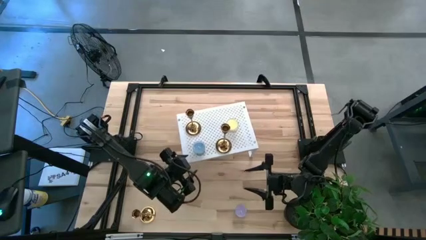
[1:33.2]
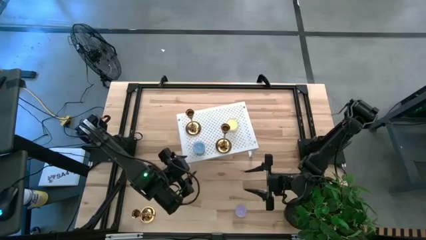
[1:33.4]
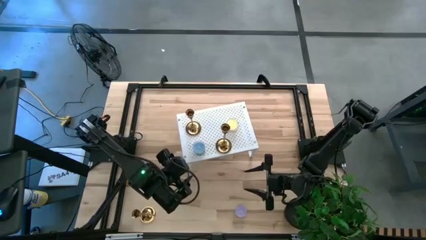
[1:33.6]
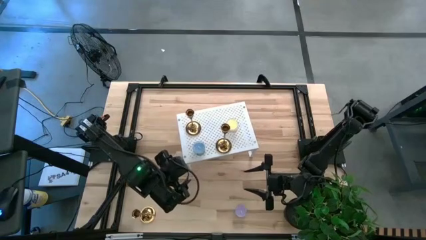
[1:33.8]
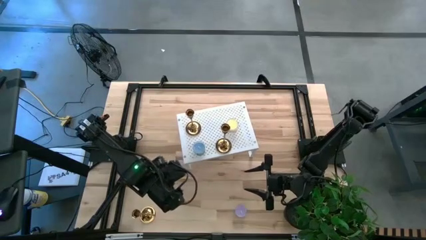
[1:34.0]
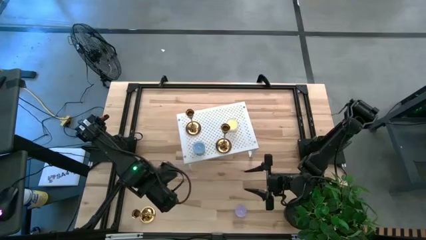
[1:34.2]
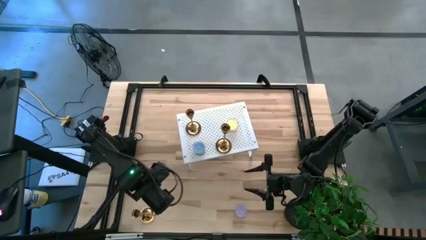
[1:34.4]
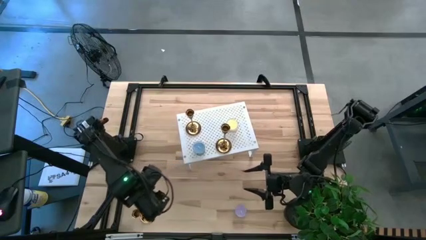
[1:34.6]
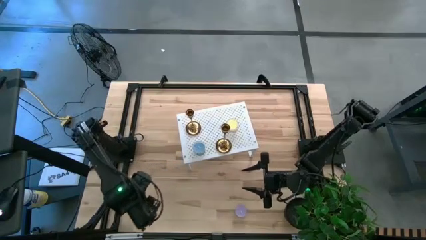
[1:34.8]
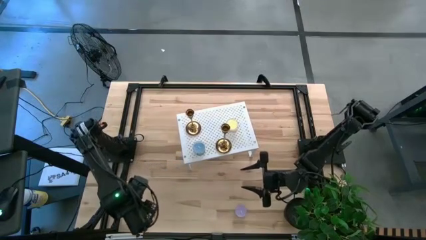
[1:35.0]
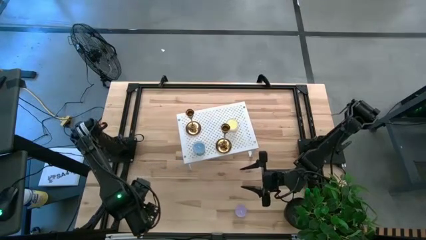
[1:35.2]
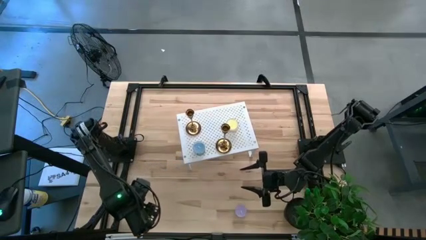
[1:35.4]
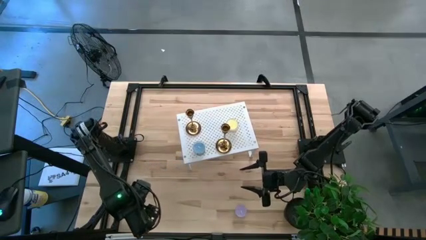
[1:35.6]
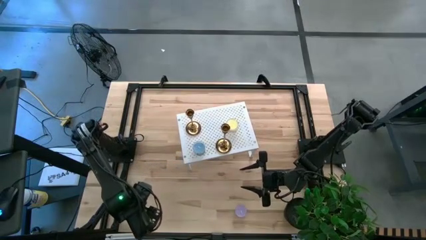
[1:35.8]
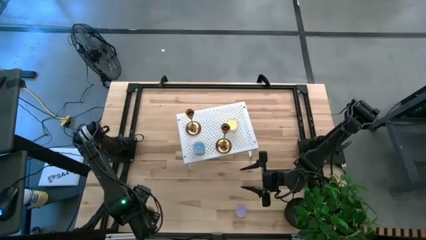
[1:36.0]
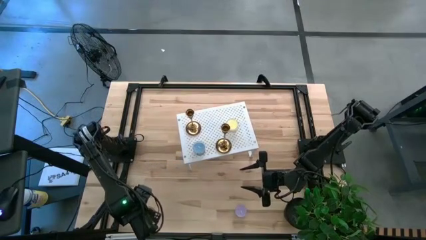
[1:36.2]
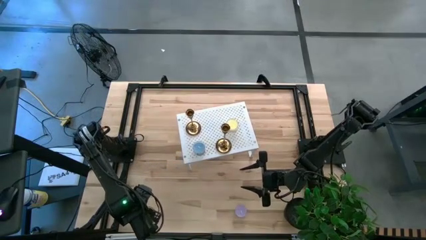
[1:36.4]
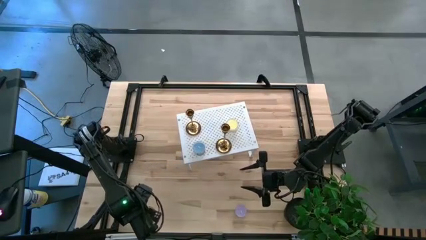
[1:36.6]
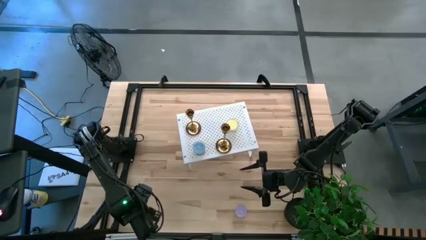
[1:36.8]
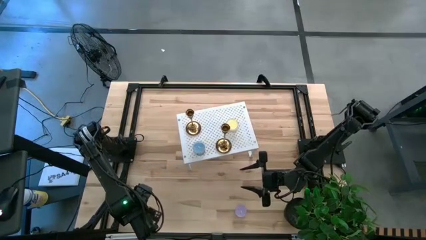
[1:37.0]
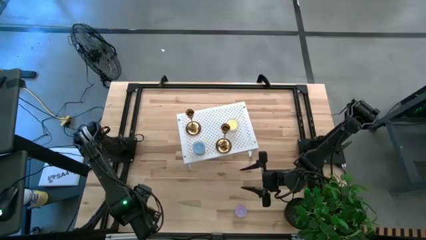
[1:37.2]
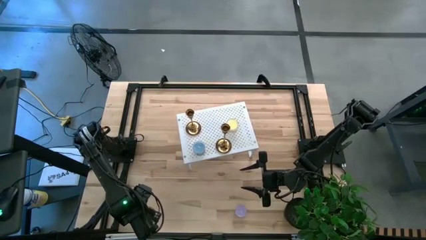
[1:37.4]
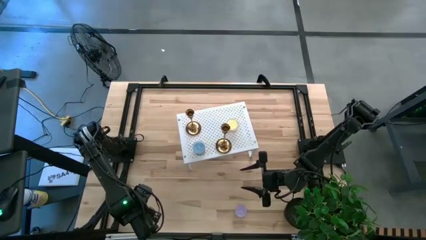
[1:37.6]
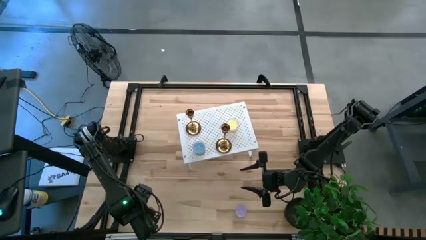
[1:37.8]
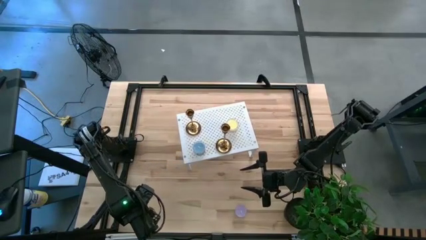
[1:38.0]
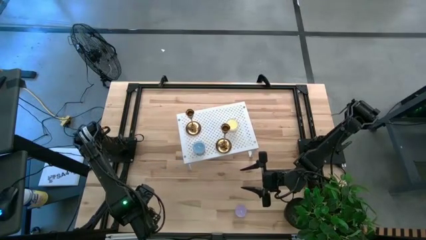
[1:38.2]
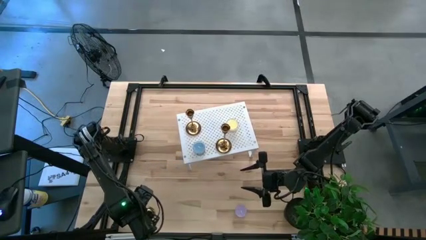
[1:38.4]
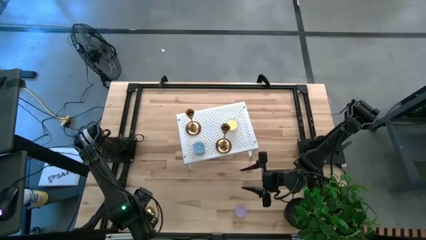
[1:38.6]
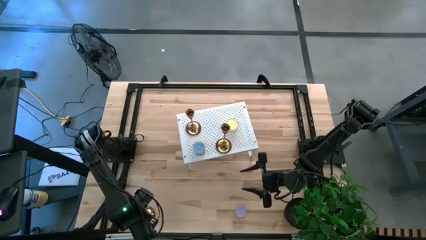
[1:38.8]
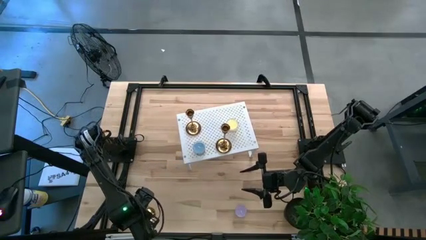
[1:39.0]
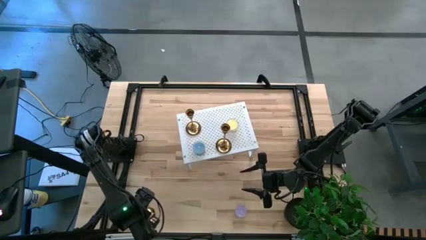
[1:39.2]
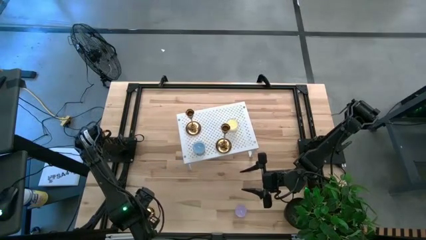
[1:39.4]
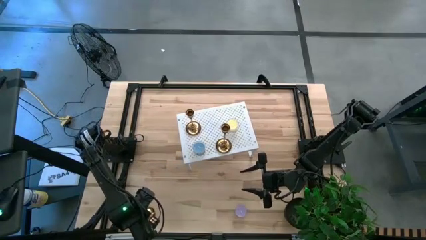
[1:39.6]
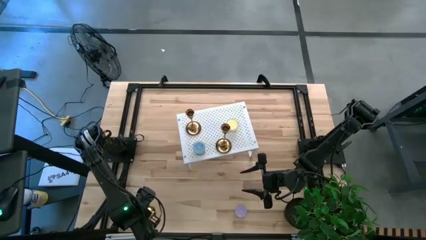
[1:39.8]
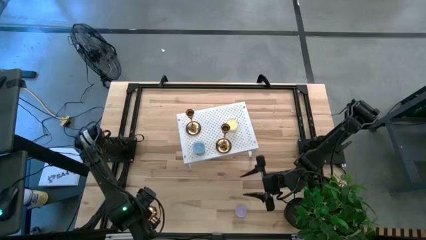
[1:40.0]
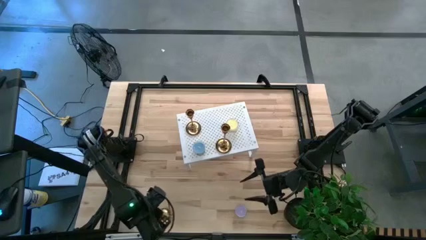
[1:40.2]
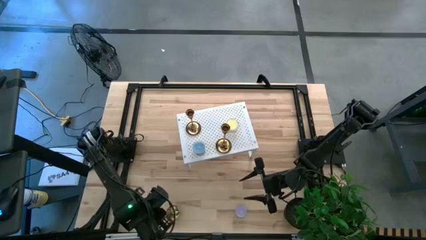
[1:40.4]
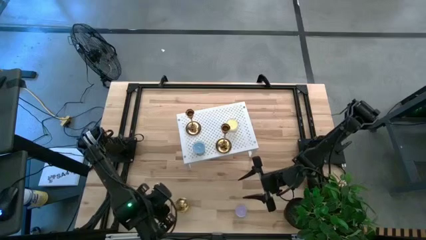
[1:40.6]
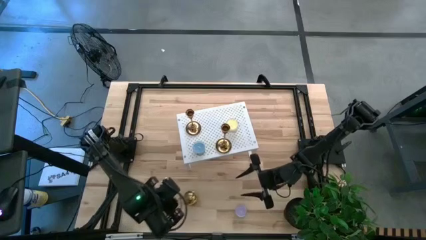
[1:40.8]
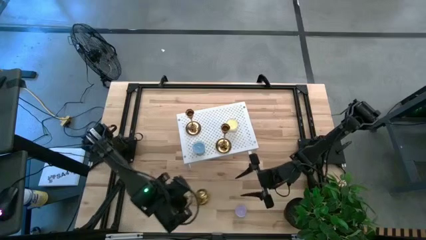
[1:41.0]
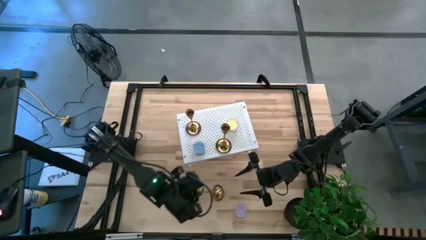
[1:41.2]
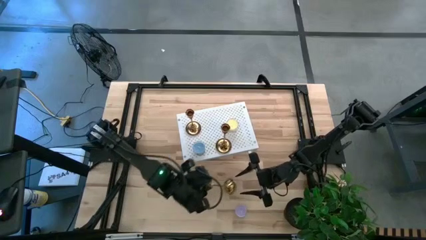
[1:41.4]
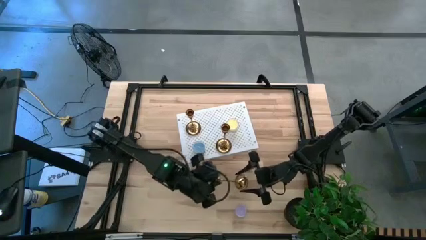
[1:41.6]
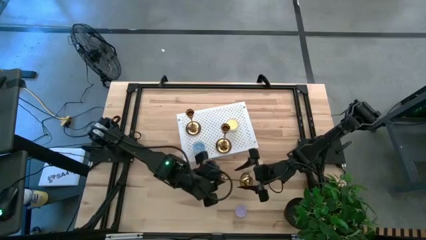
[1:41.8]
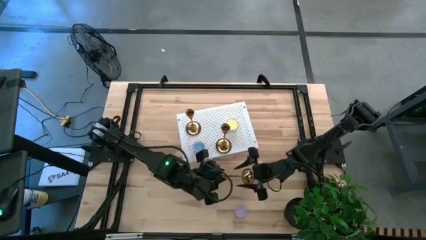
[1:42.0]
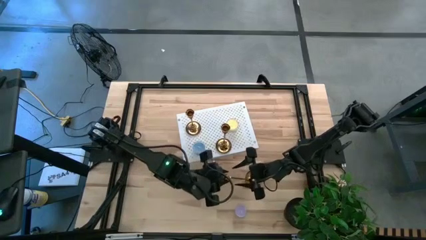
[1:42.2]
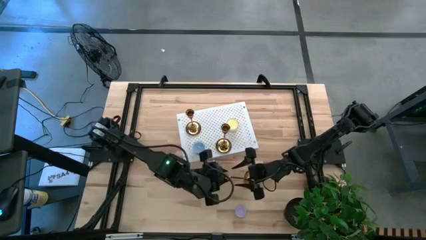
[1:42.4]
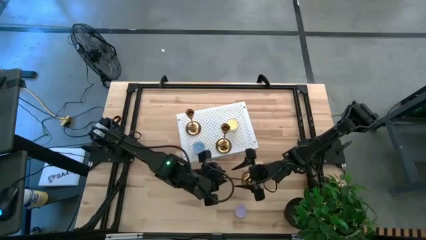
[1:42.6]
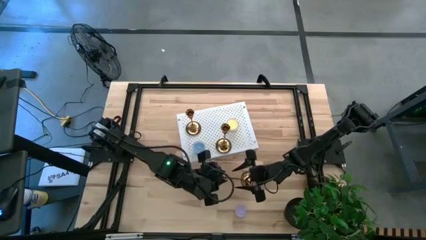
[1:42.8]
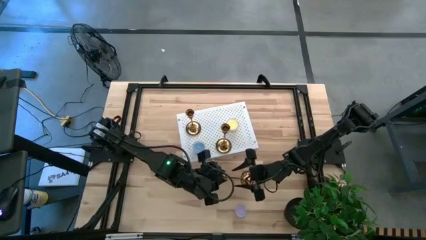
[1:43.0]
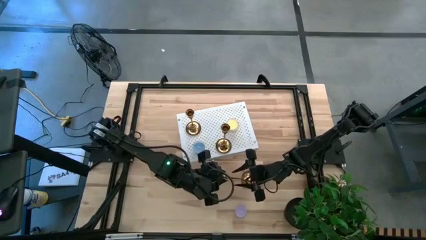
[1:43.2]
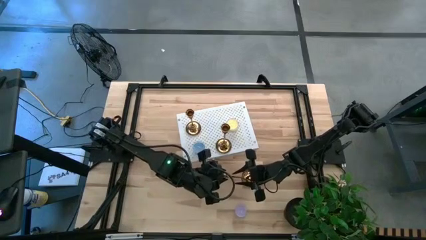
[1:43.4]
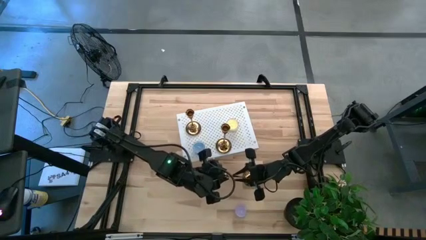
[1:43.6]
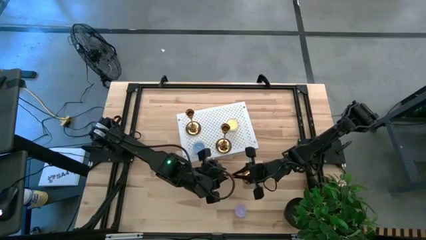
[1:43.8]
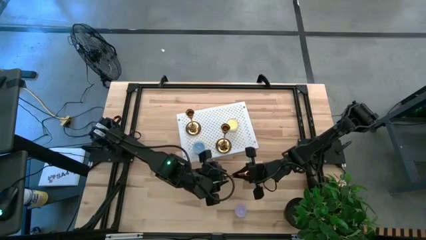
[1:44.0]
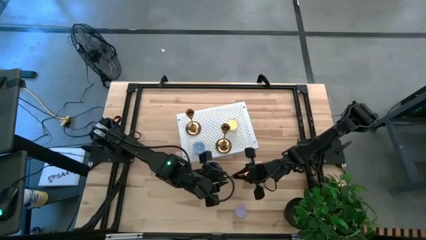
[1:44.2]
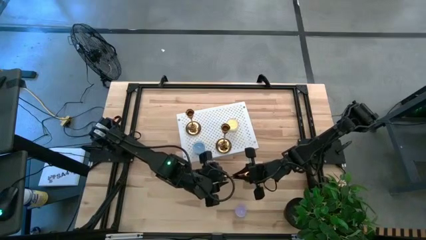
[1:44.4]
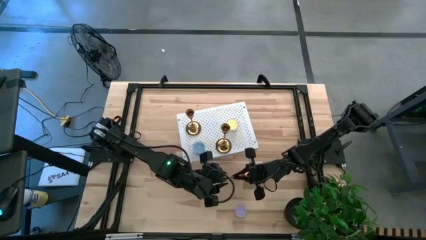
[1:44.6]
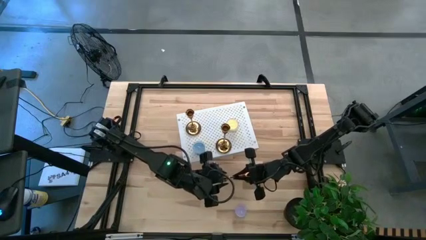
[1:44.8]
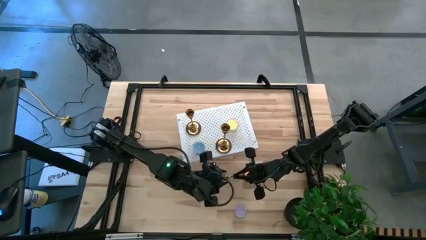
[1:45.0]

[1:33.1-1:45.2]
Task: Pick & Place candle stick holders
Put the yellow candle holder on the shelf
